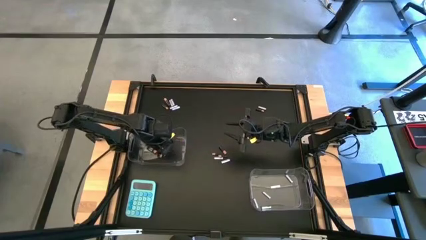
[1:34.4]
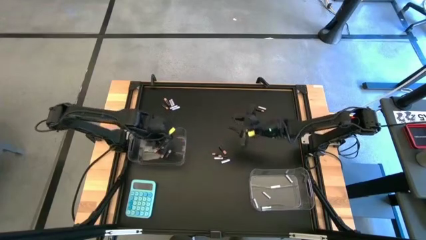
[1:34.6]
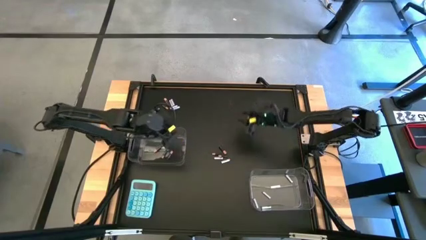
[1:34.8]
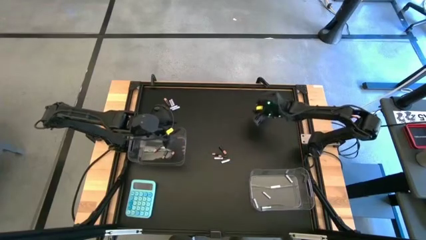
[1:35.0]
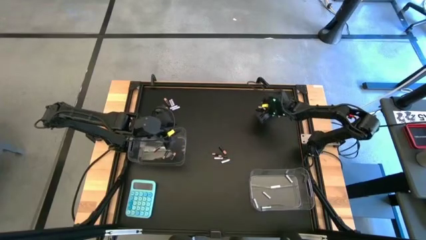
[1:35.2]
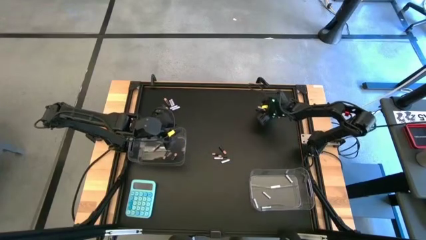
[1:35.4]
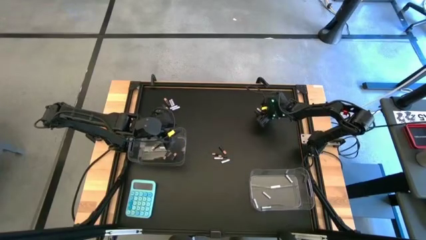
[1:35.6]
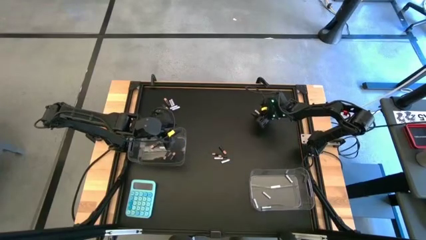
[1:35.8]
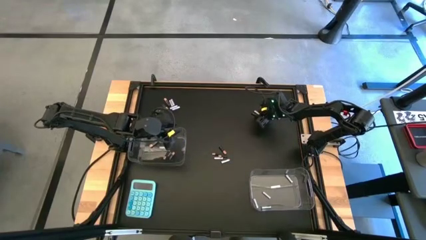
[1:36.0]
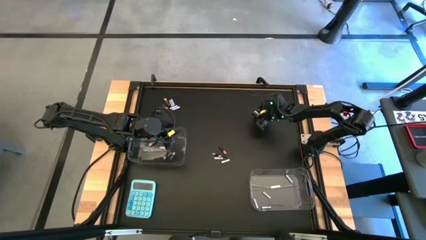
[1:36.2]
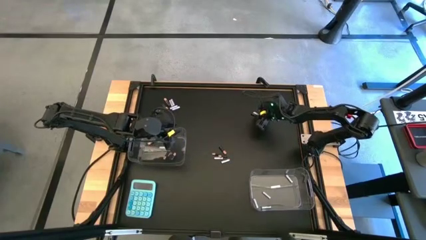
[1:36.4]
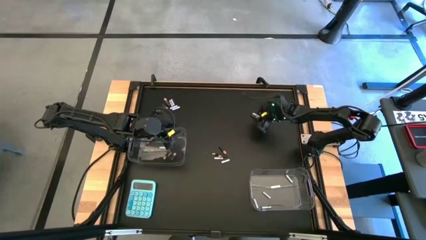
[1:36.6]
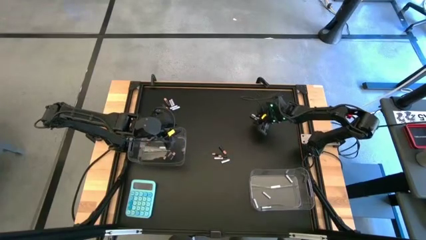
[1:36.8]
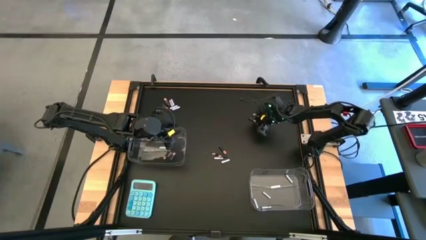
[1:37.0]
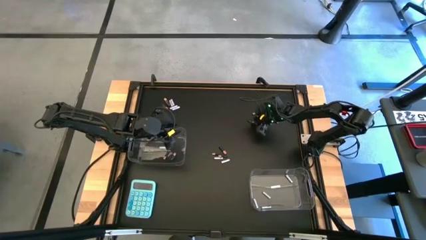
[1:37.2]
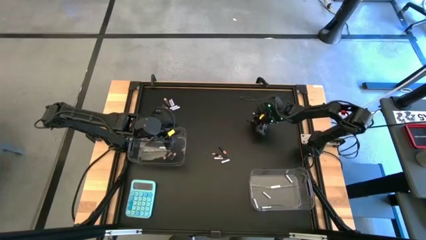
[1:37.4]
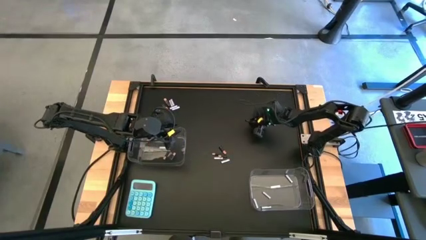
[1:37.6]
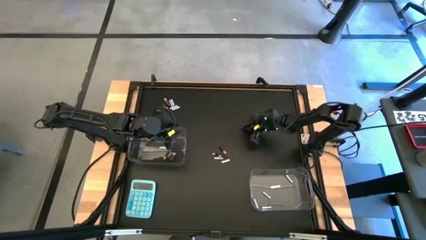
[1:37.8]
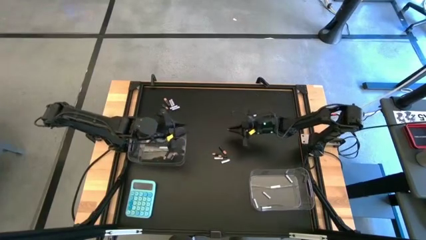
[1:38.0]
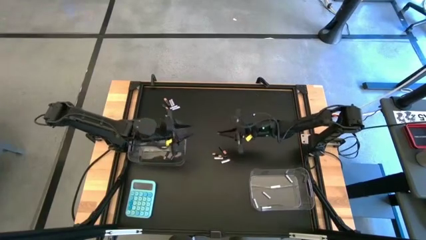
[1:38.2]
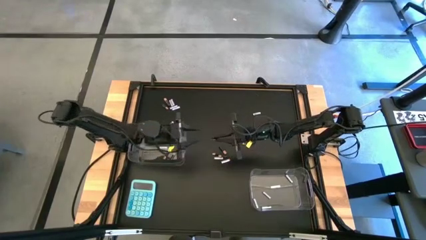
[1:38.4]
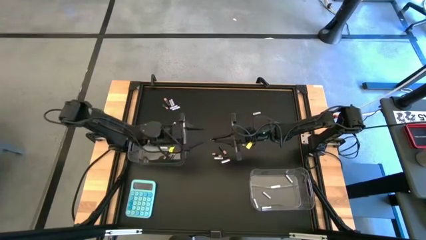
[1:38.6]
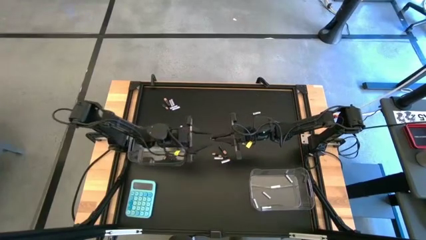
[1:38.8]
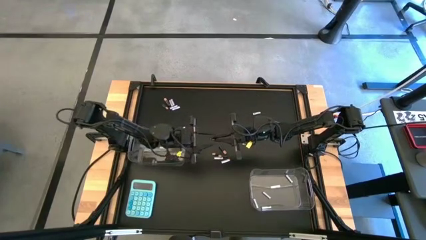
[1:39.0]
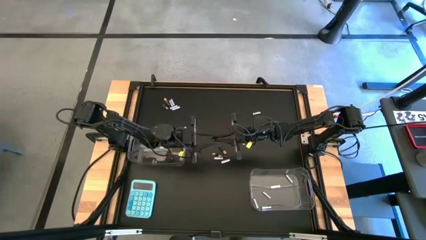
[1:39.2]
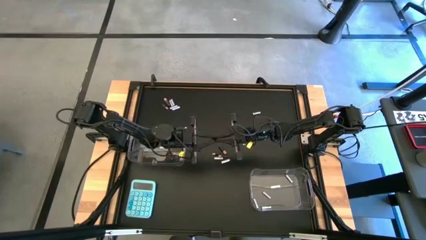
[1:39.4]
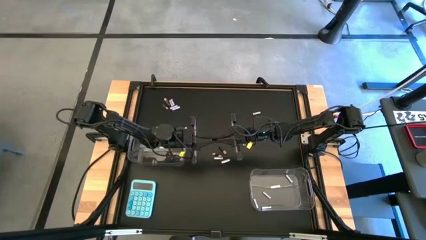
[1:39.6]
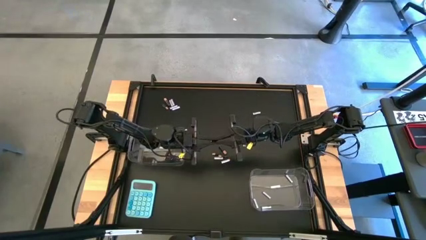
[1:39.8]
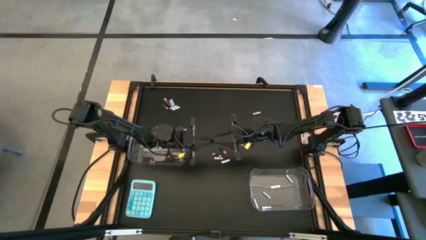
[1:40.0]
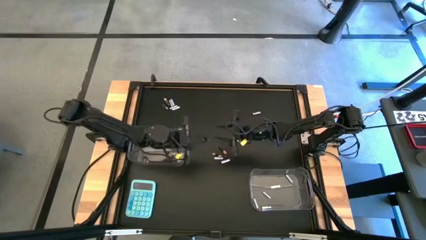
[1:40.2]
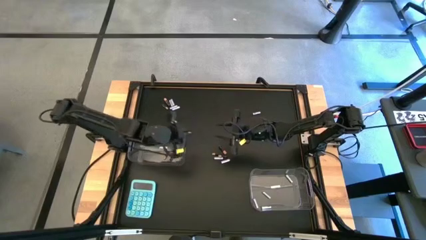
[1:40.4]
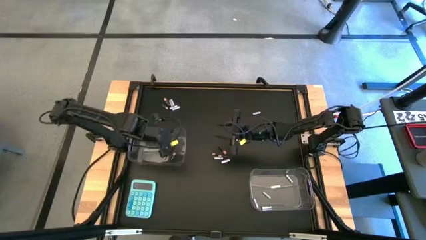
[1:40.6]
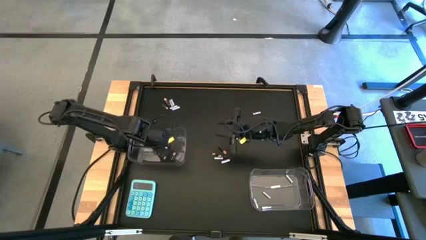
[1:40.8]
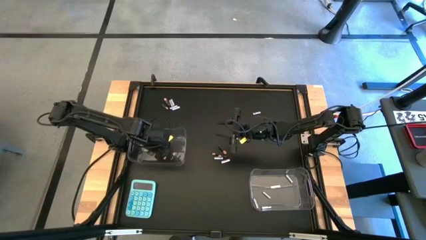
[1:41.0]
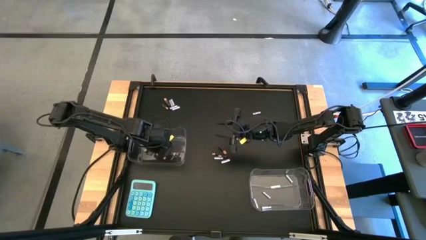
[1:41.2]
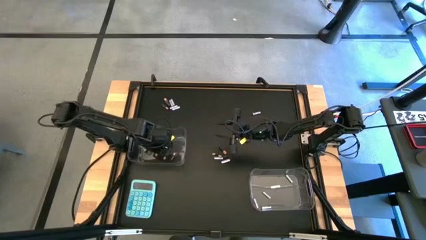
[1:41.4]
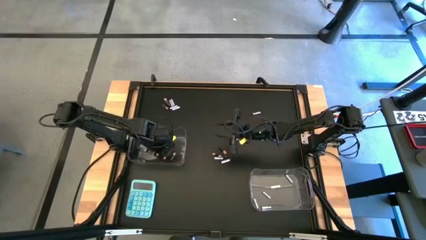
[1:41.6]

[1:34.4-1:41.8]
Task: Sort batteries
Put the black battery into the left transparent bin

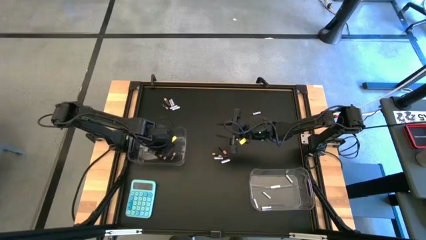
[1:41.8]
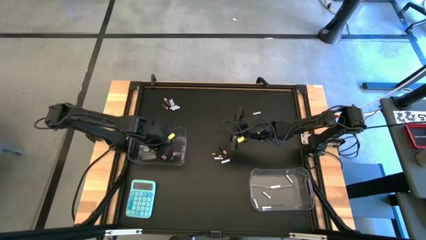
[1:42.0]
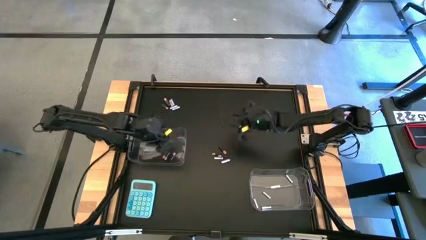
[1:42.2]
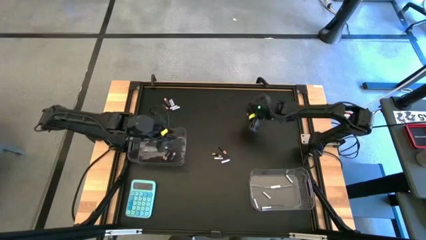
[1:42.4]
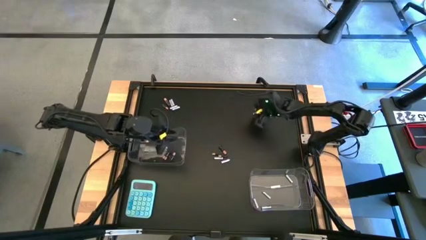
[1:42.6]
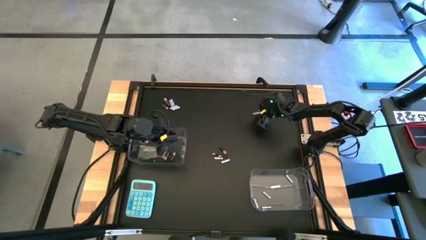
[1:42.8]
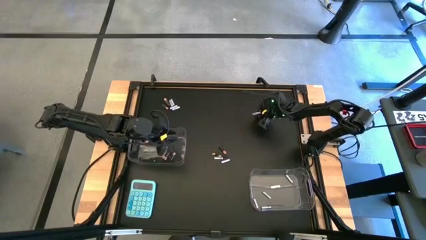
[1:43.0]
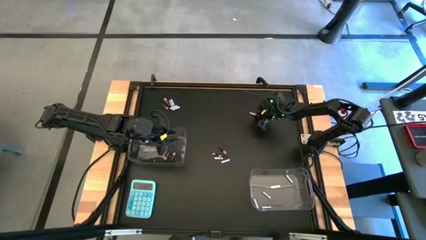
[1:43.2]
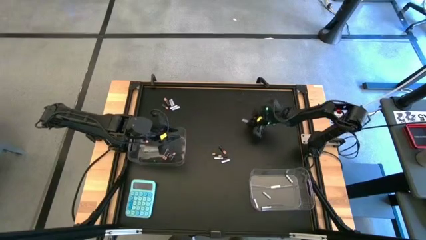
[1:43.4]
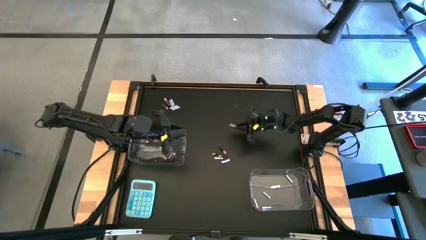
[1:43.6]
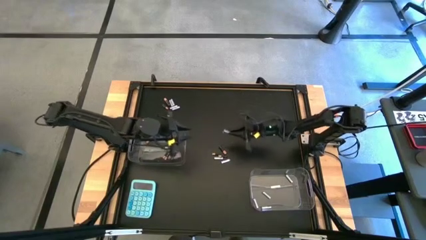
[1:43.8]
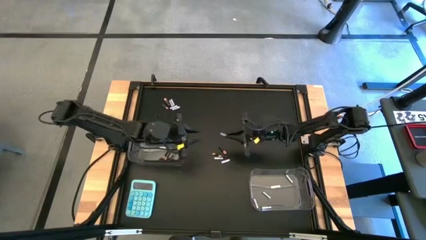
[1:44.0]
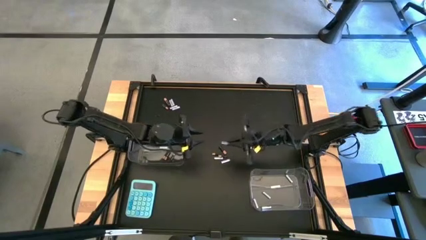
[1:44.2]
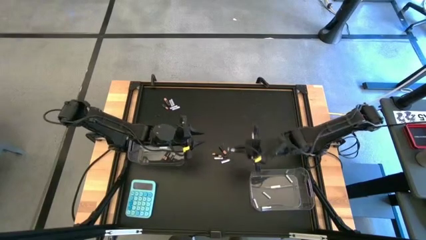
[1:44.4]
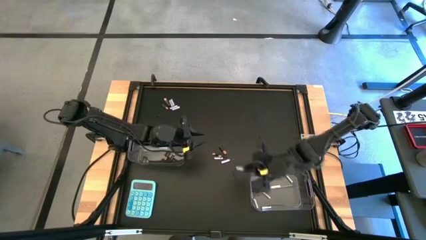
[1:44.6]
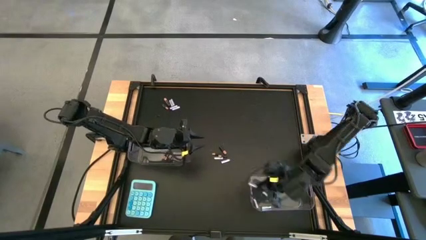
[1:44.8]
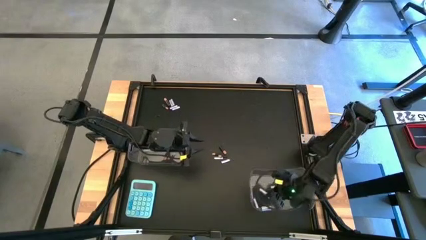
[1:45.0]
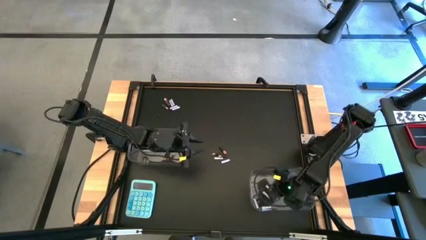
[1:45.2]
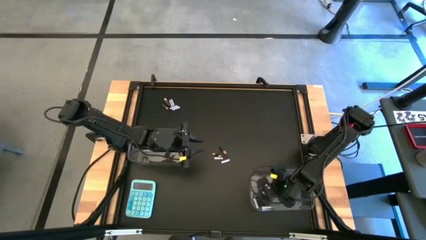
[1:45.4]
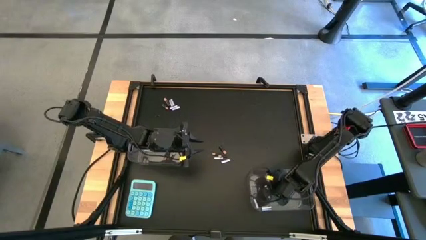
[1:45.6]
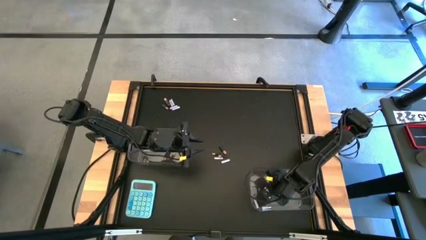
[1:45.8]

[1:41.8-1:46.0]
Put the white battery into the right transparent bin

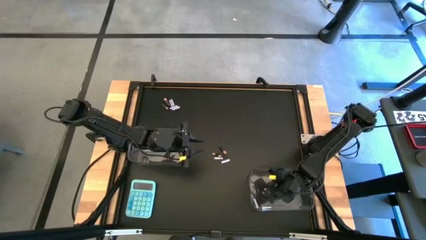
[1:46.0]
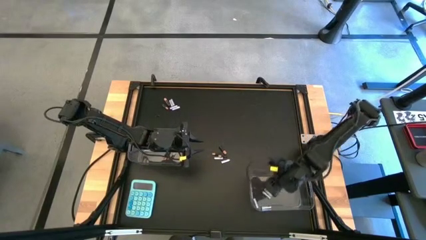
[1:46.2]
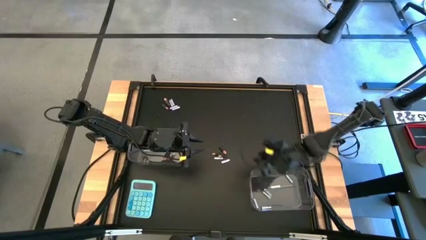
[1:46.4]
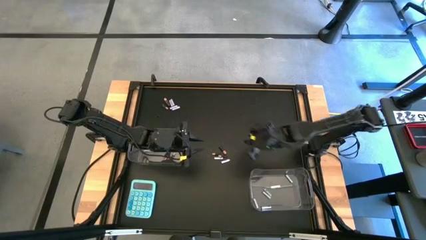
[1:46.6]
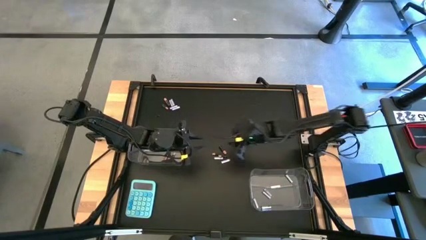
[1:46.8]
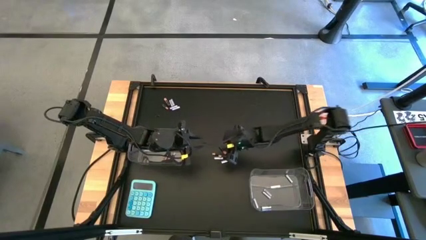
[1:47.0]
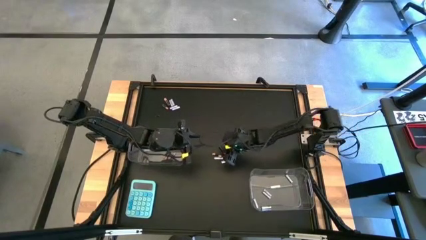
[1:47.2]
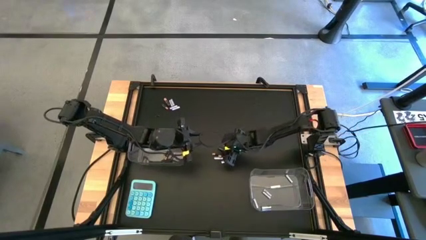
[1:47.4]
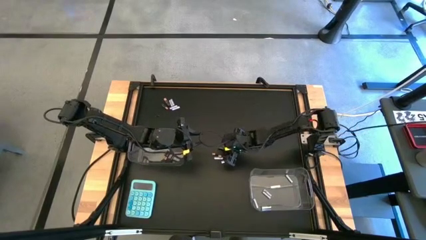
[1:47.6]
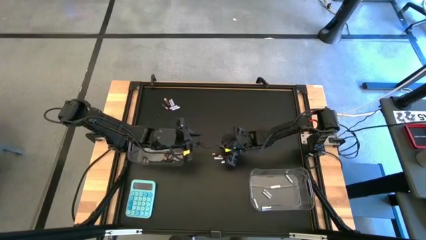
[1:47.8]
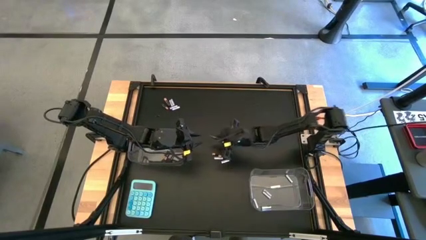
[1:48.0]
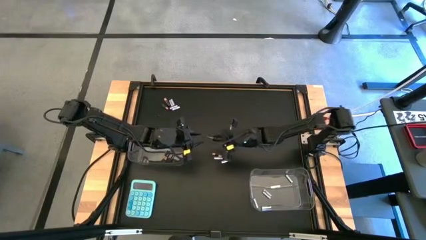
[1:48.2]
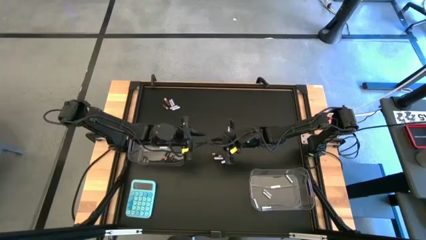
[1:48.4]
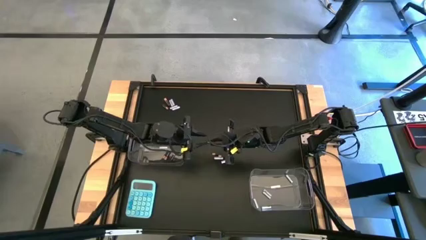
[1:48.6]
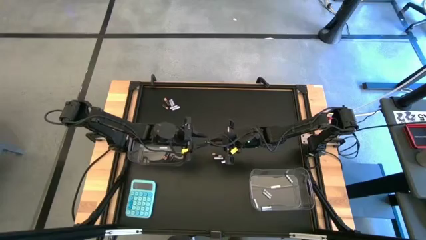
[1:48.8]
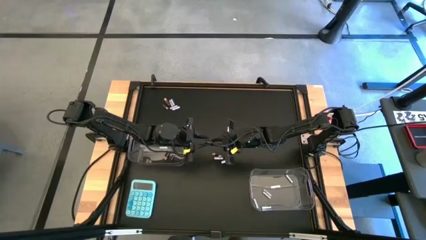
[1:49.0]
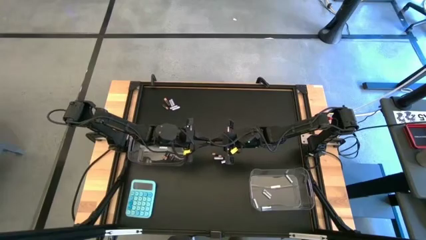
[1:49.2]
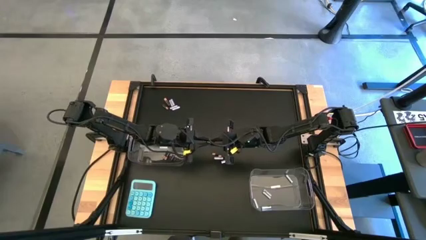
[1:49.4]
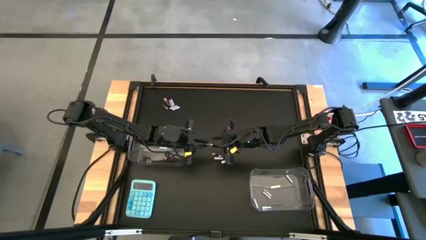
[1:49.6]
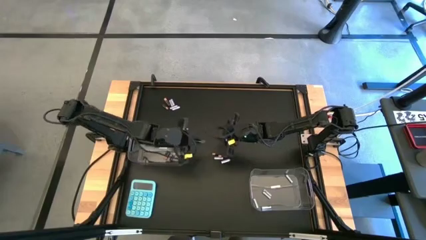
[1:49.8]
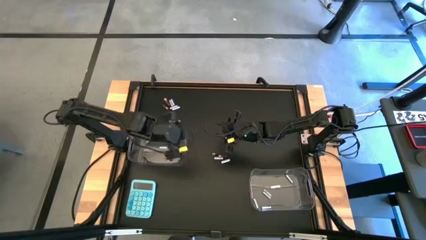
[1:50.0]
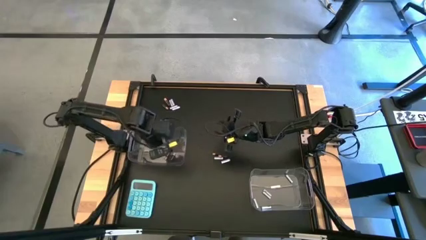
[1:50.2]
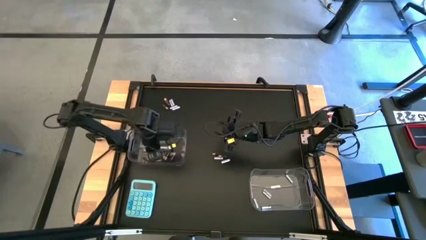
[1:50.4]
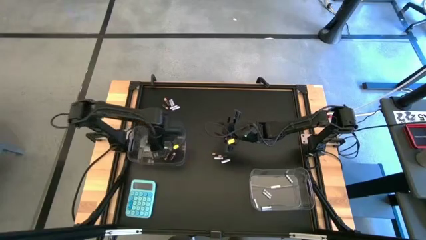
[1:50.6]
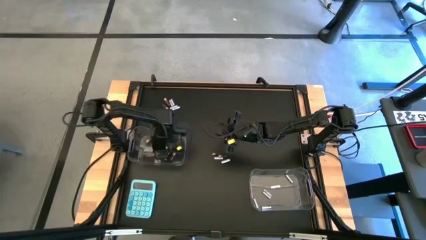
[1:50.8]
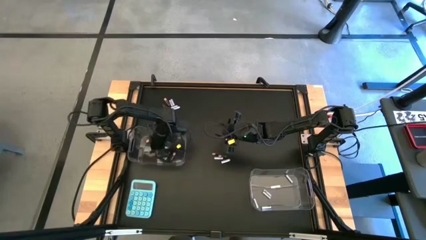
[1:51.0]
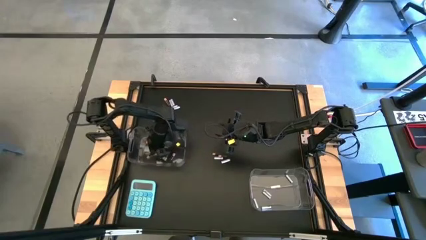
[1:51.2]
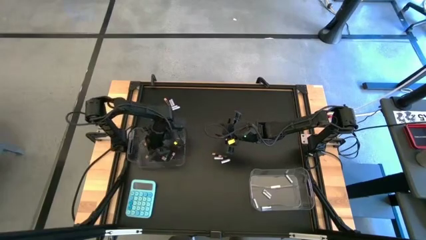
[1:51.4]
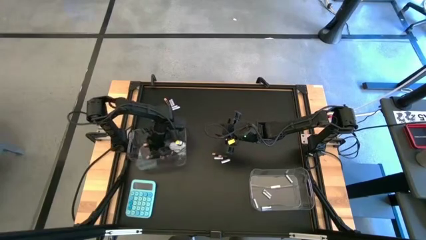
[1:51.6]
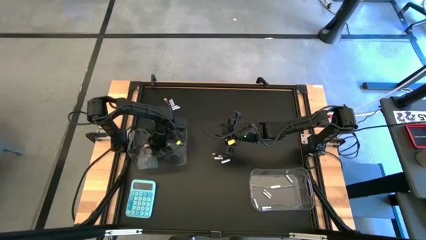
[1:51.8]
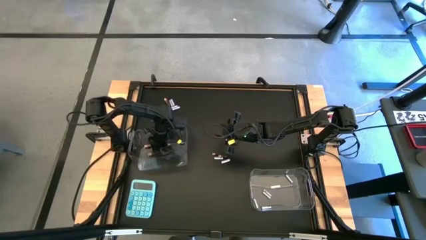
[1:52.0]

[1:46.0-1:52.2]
Put the black battery into the left transparent bin
